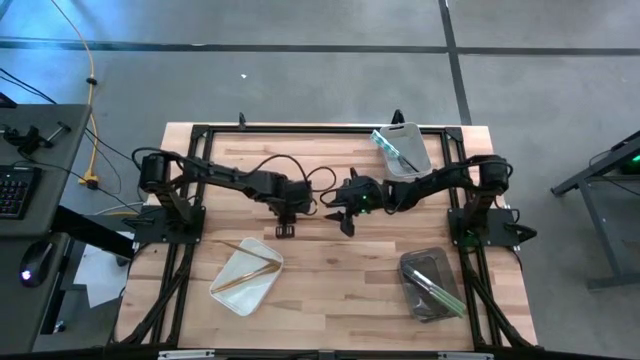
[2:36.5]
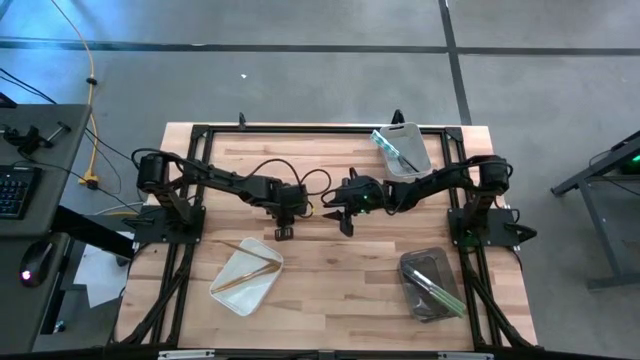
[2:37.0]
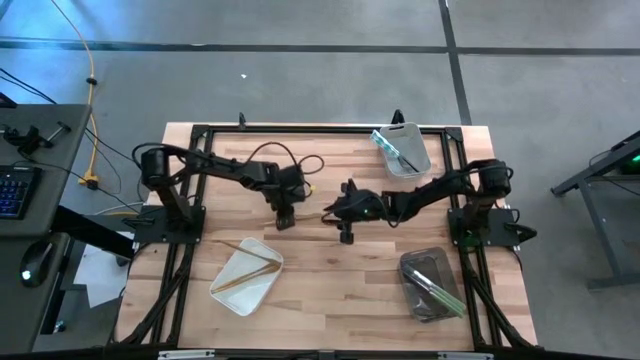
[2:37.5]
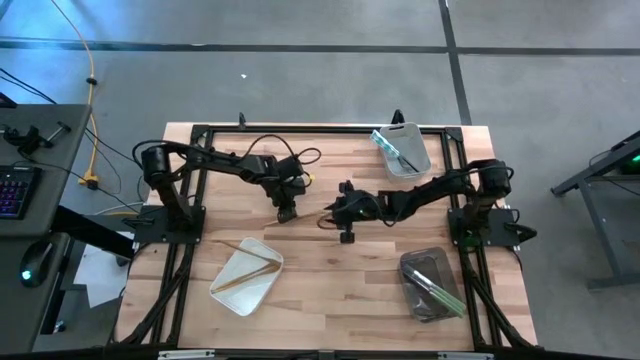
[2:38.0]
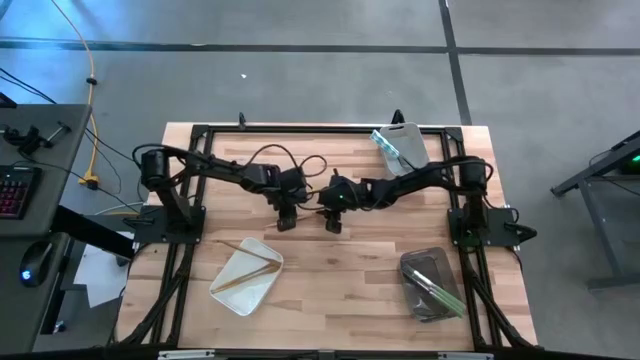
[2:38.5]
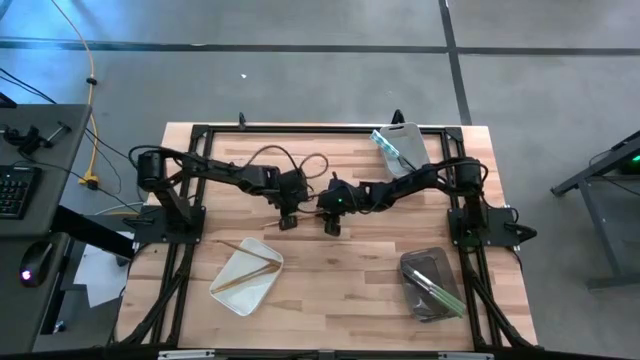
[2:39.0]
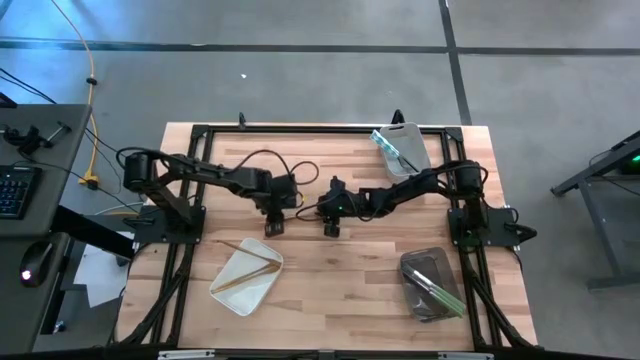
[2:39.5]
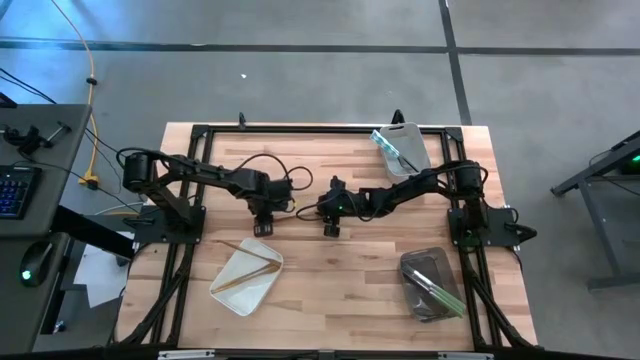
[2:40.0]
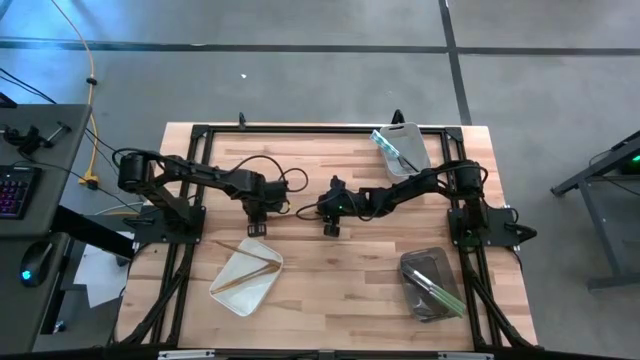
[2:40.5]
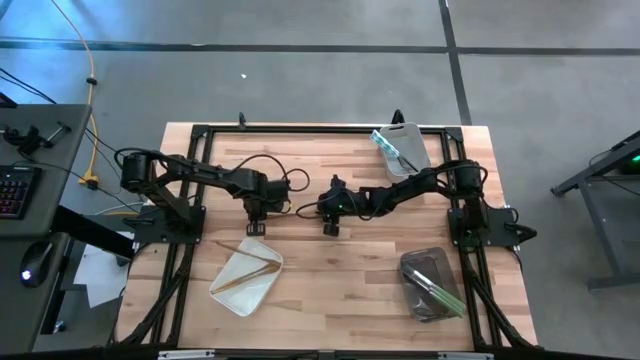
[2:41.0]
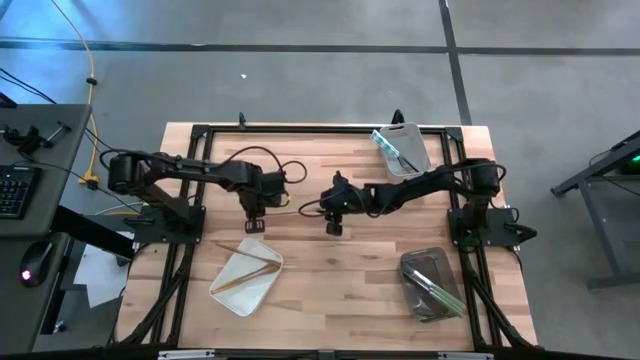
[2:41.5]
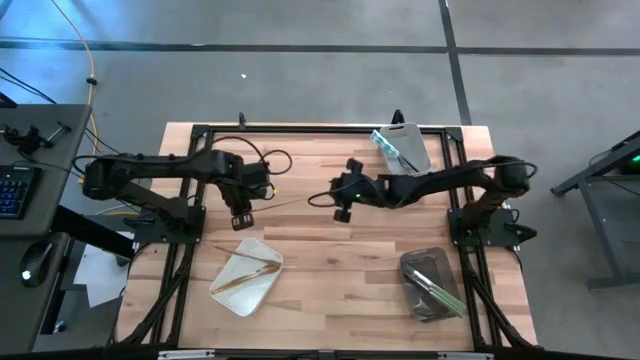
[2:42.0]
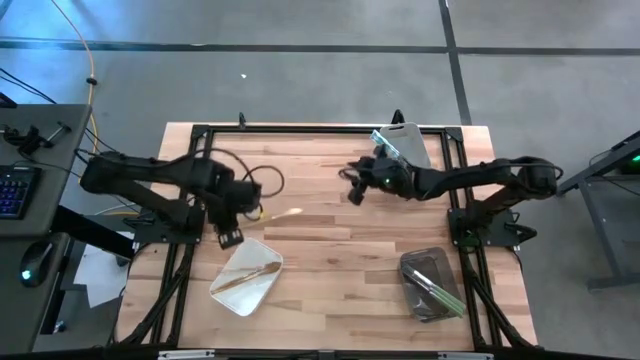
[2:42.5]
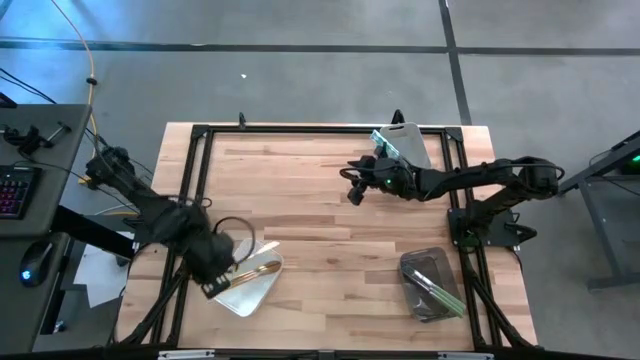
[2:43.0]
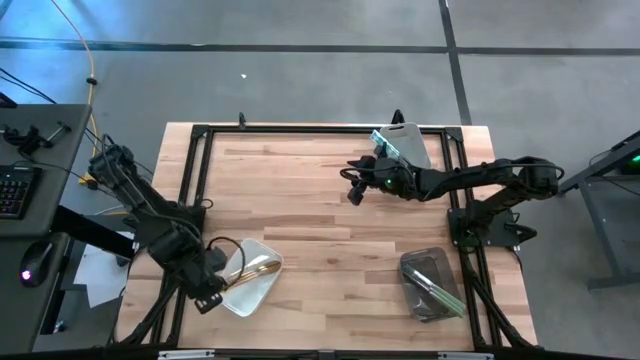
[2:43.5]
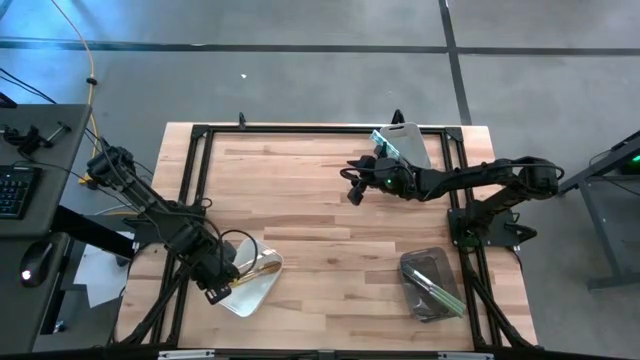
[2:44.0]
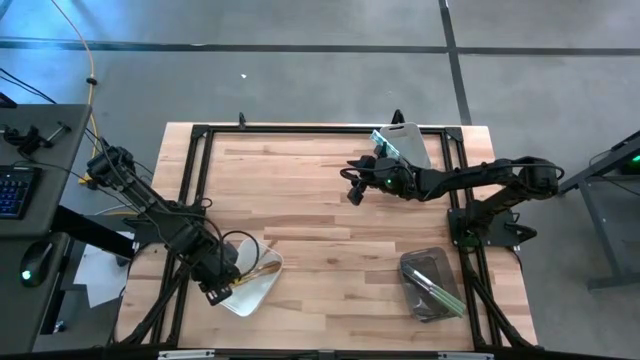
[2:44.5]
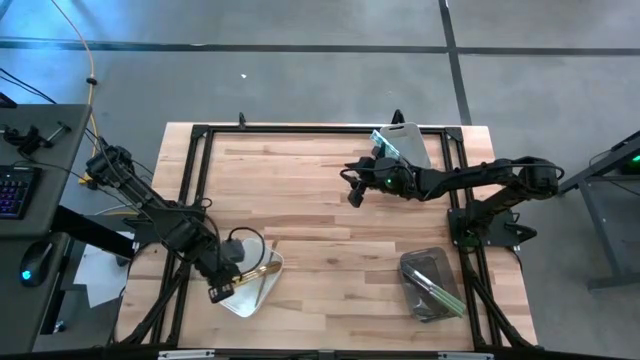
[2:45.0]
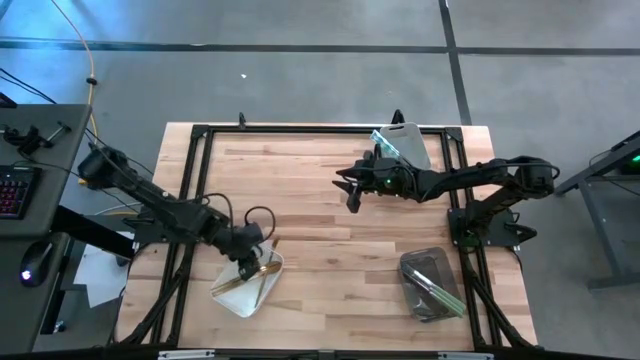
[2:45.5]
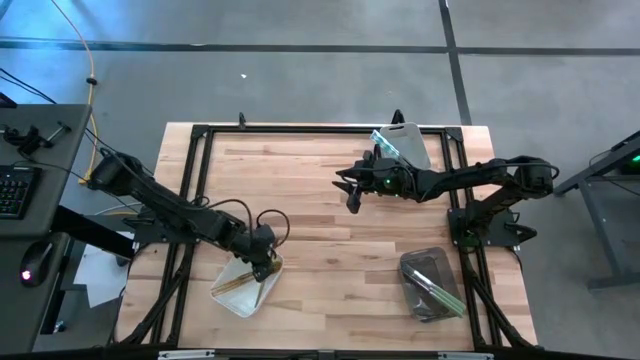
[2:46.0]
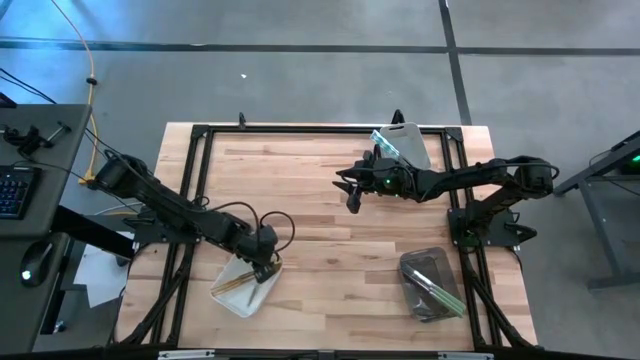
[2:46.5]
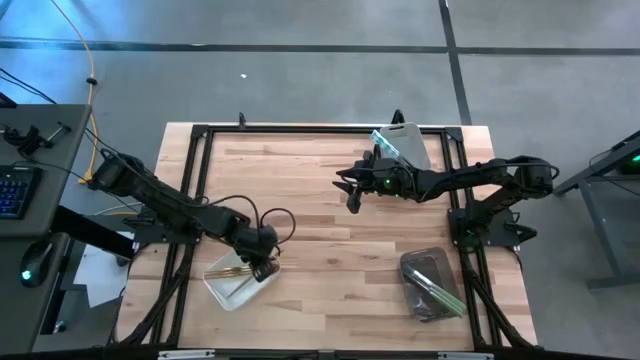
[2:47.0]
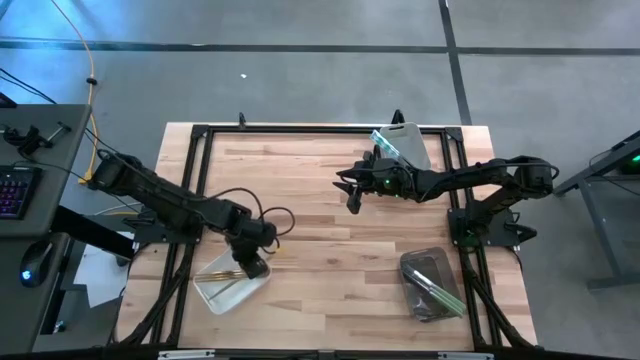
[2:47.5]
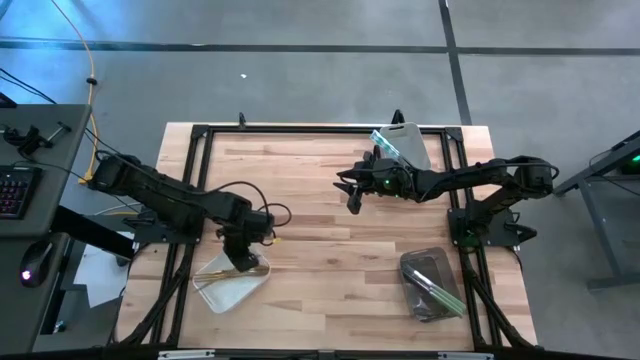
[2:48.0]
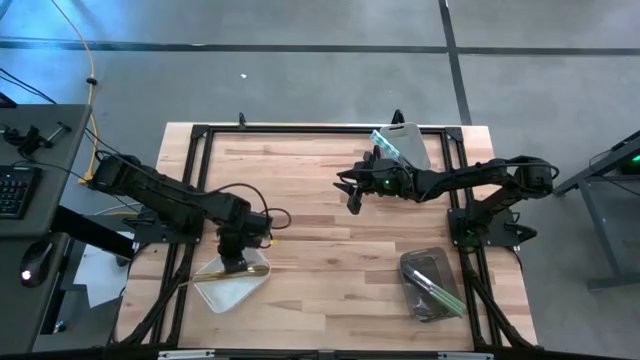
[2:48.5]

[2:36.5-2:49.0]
Task: Sort silverware by color (type)
Put the gold table knife into the white bin

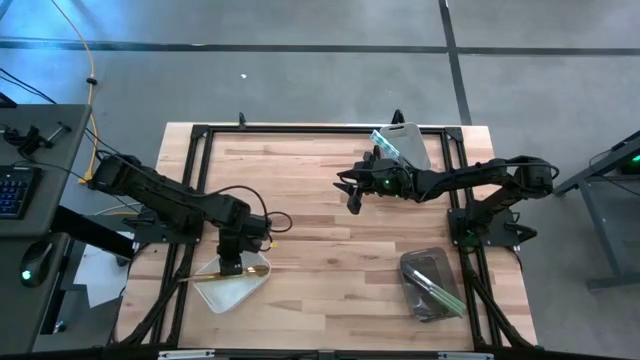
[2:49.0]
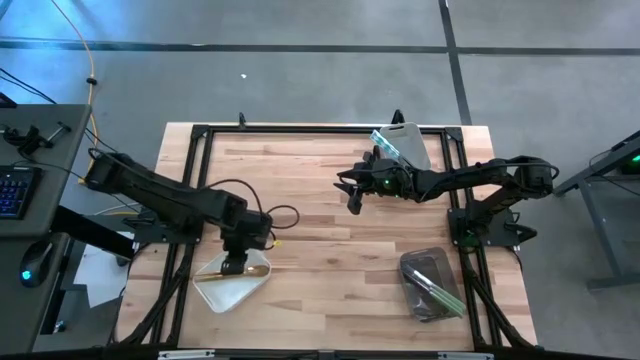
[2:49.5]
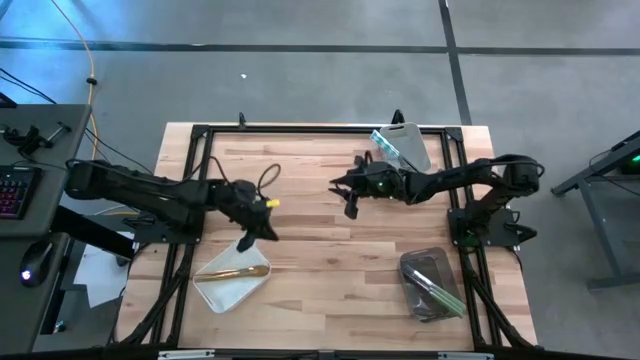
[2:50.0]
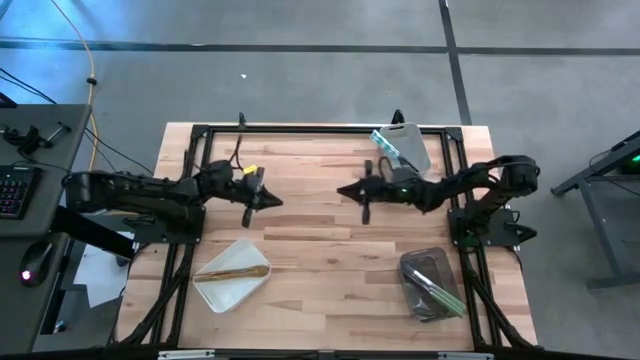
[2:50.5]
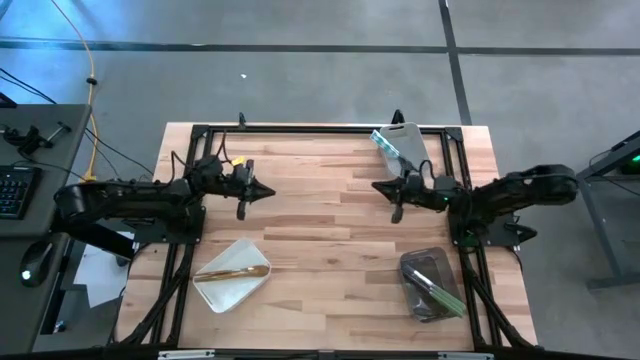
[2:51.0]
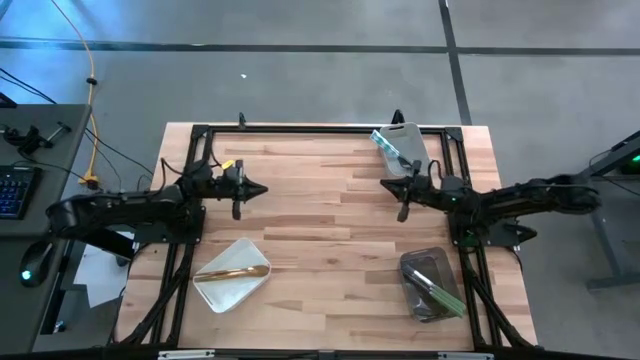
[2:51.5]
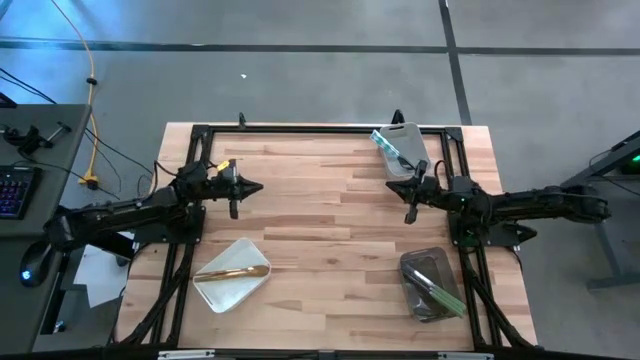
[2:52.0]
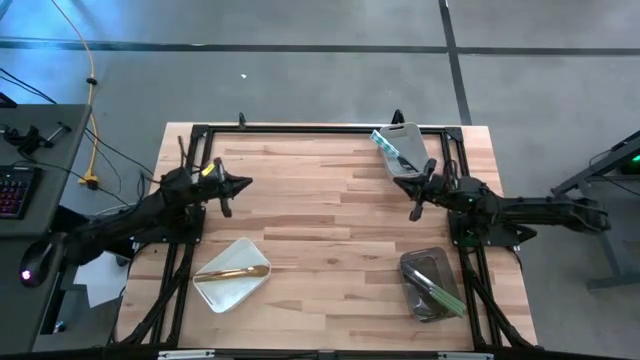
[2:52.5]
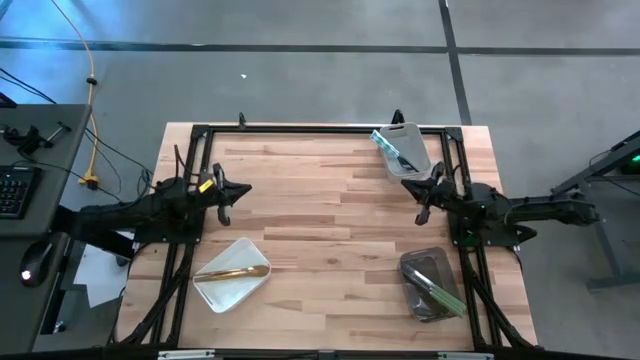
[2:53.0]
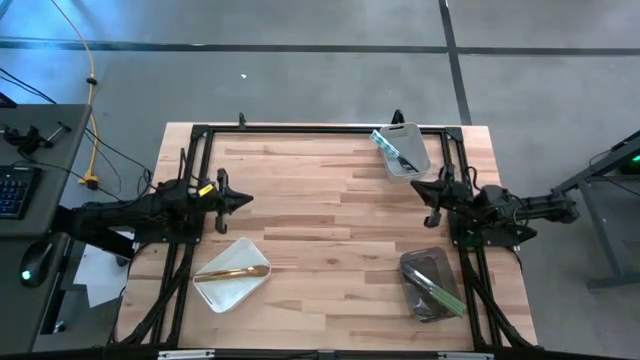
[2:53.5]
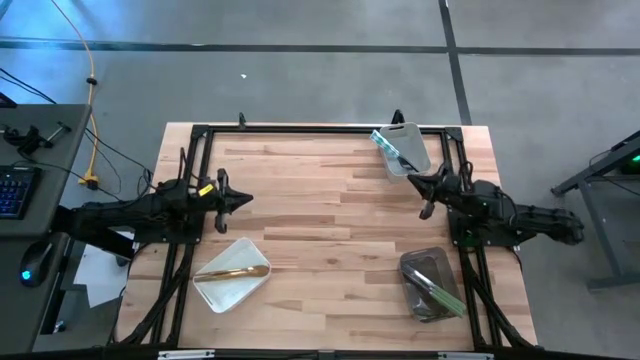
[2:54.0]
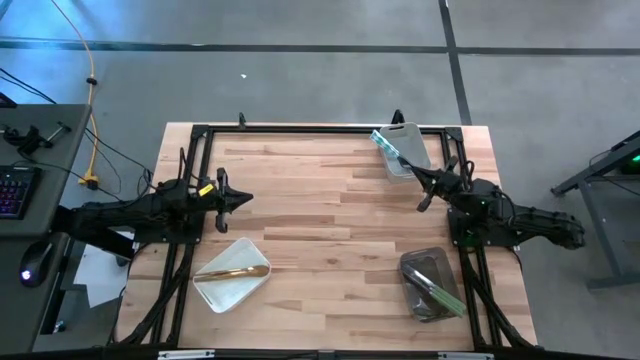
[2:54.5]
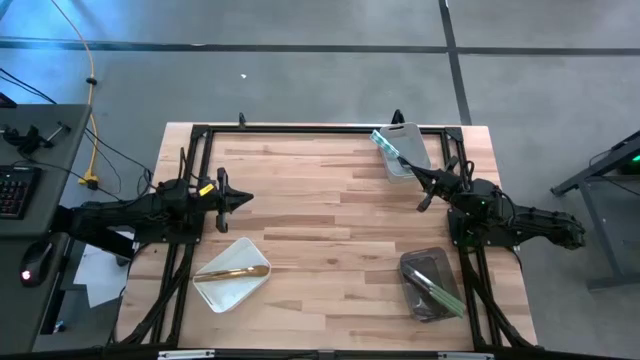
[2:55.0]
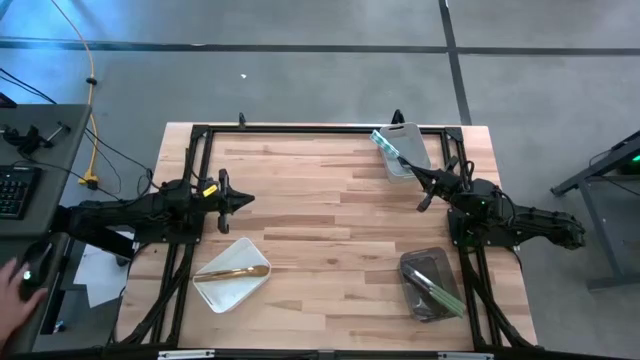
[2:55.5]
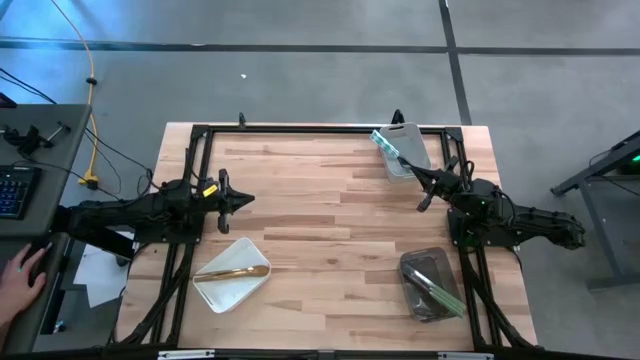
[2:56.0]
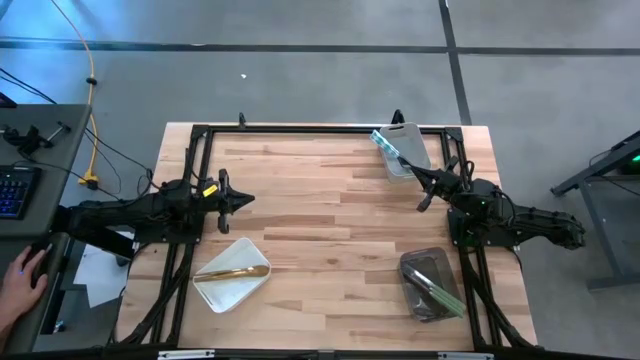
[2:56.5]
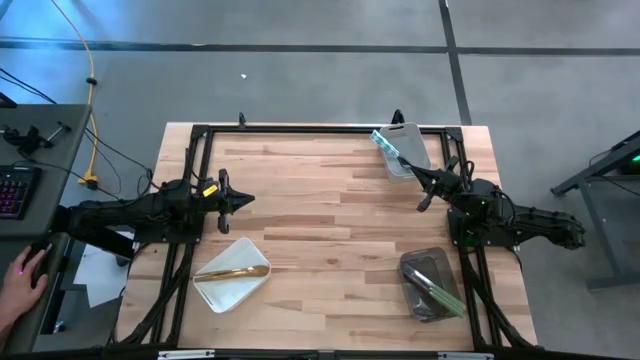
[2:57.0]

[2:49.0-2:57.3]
Return to Home Position
